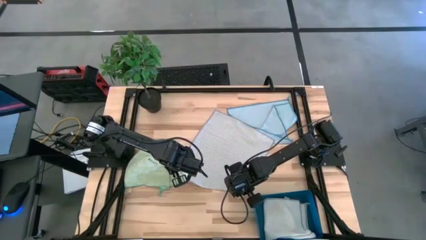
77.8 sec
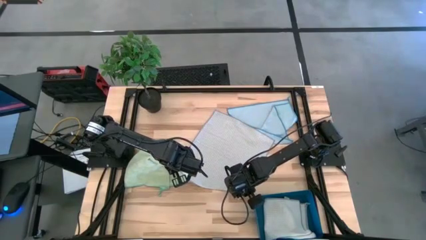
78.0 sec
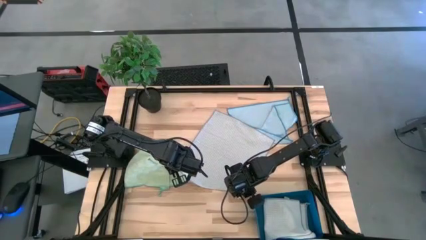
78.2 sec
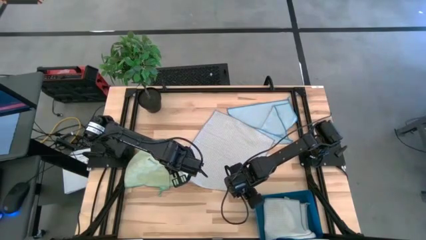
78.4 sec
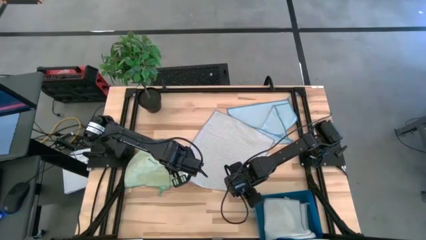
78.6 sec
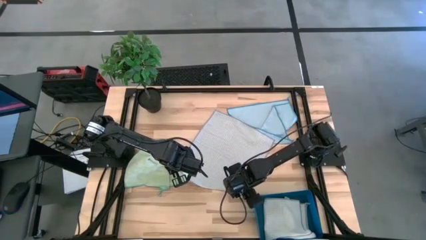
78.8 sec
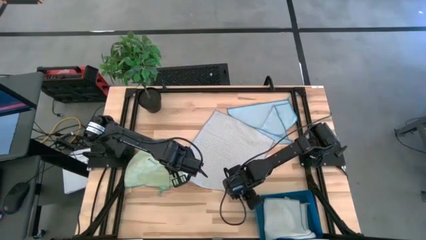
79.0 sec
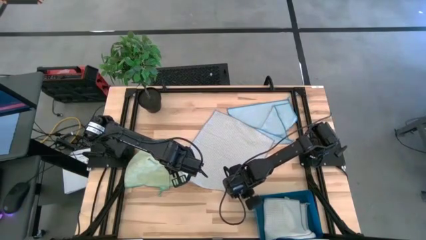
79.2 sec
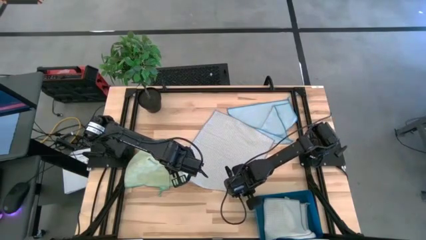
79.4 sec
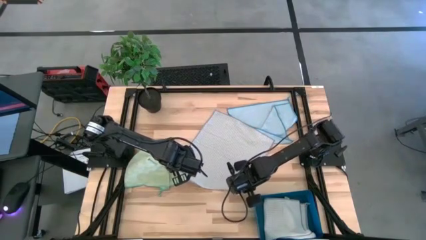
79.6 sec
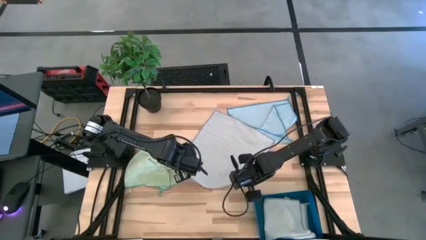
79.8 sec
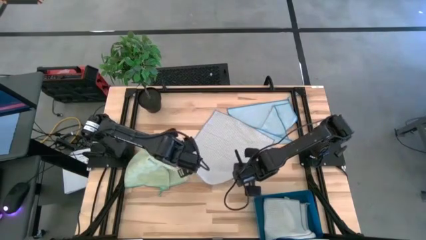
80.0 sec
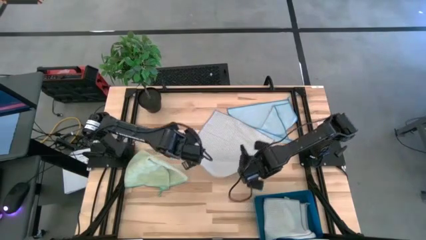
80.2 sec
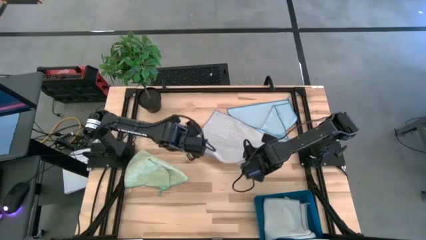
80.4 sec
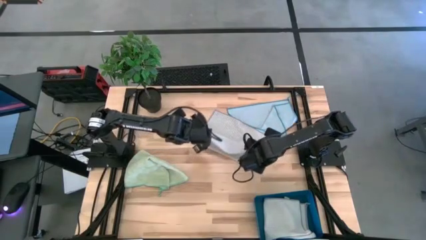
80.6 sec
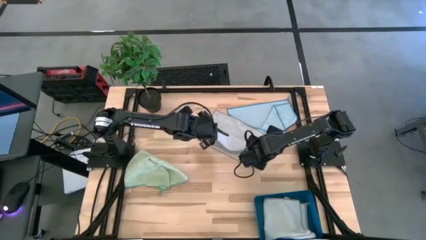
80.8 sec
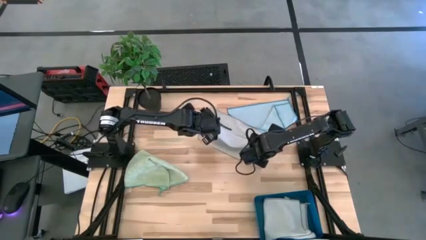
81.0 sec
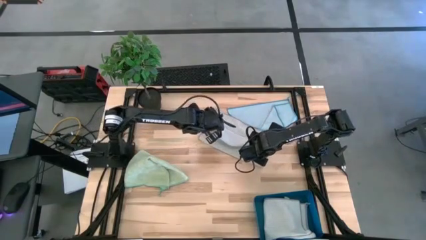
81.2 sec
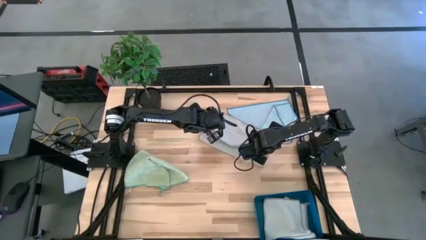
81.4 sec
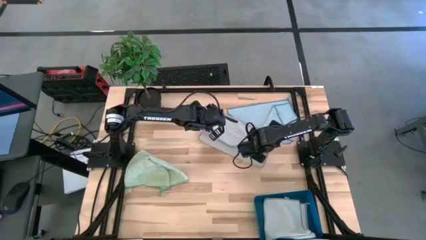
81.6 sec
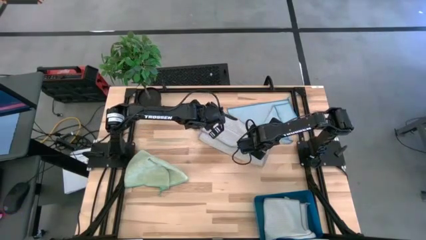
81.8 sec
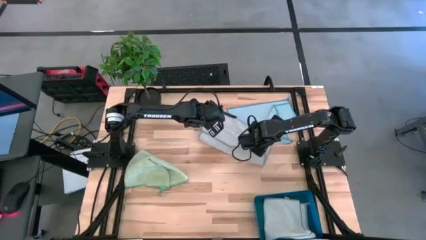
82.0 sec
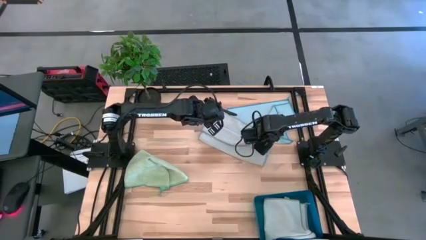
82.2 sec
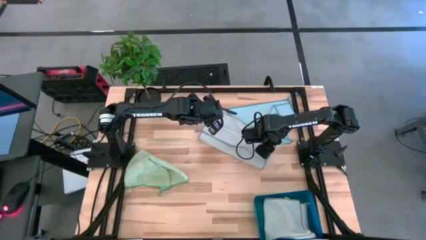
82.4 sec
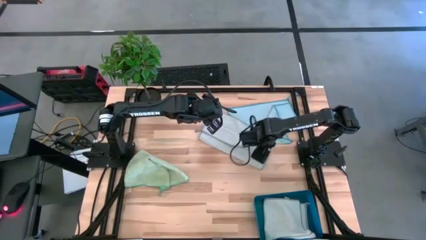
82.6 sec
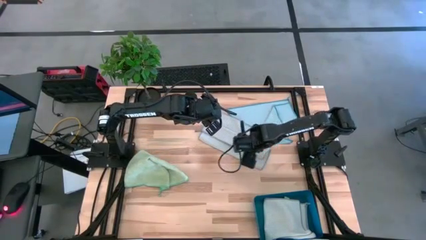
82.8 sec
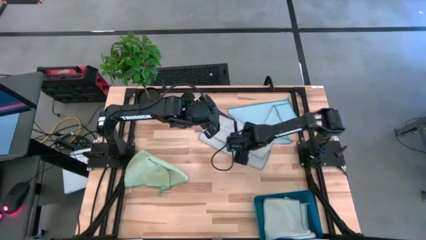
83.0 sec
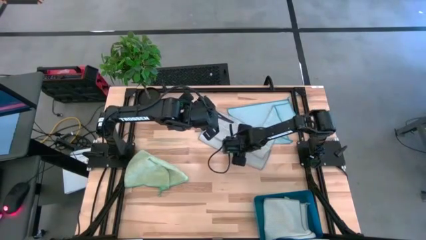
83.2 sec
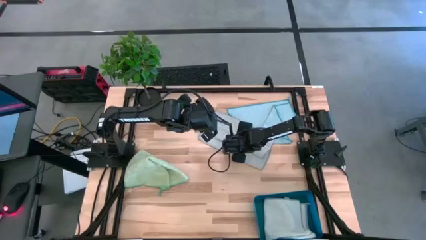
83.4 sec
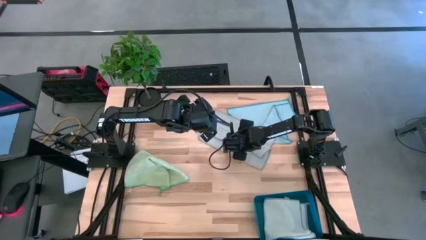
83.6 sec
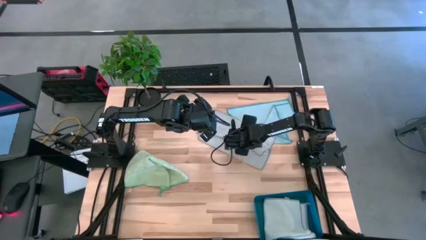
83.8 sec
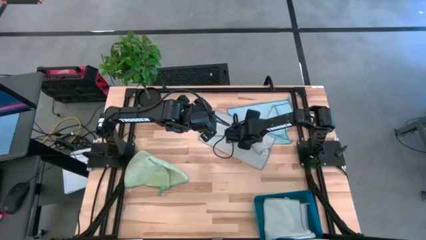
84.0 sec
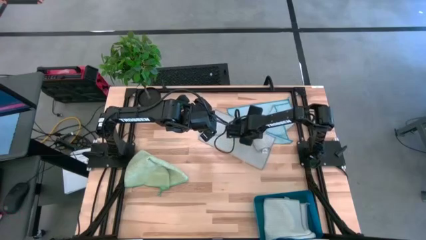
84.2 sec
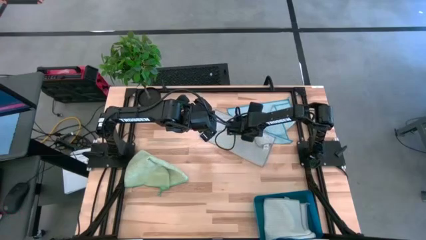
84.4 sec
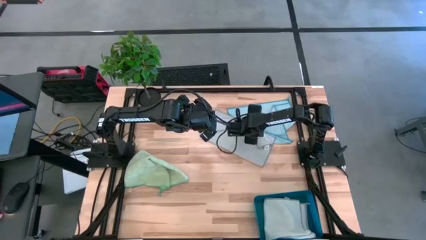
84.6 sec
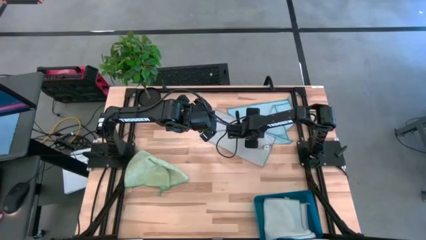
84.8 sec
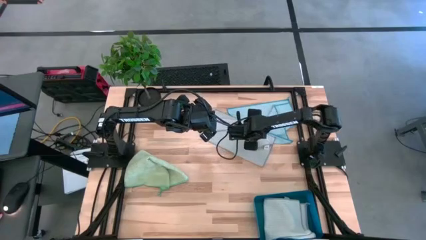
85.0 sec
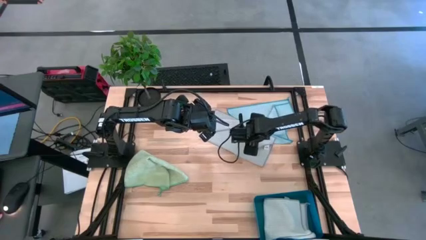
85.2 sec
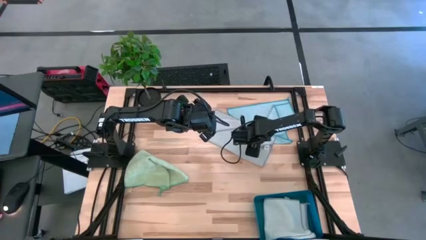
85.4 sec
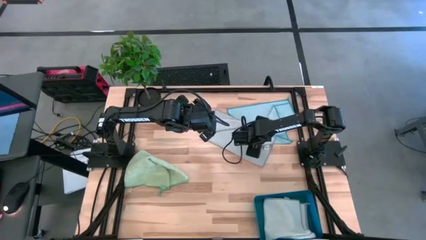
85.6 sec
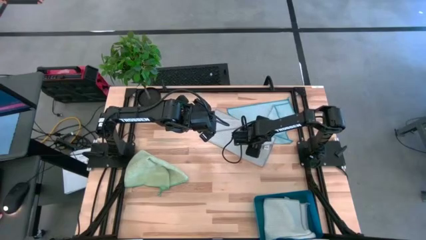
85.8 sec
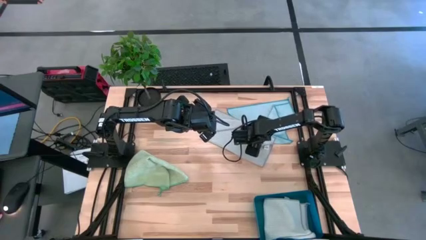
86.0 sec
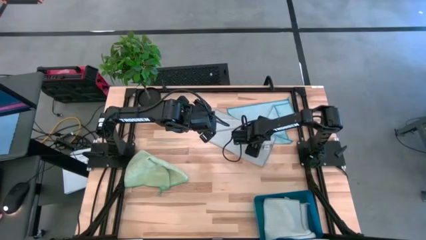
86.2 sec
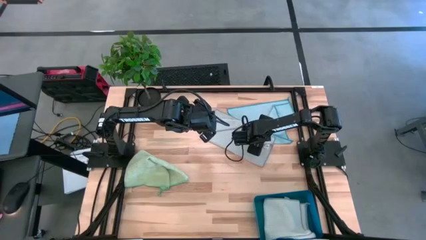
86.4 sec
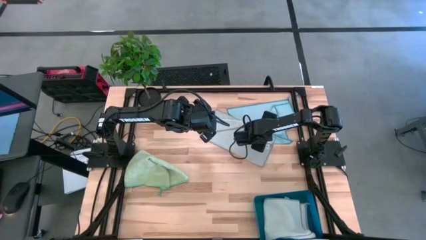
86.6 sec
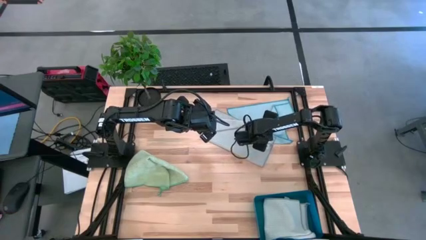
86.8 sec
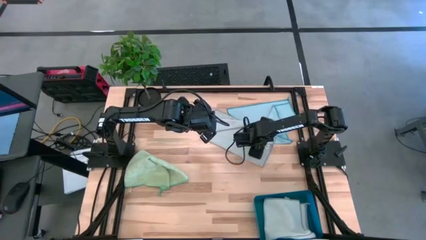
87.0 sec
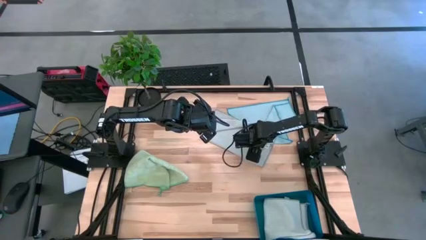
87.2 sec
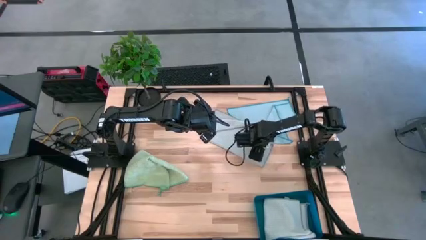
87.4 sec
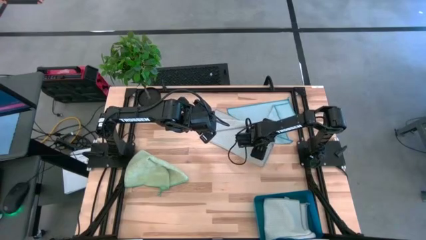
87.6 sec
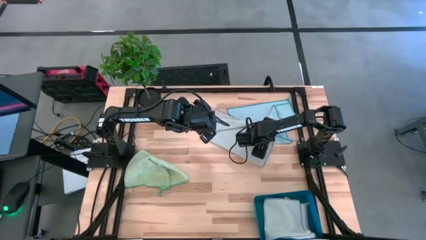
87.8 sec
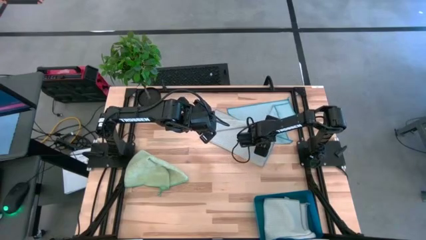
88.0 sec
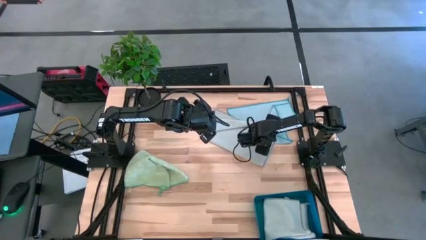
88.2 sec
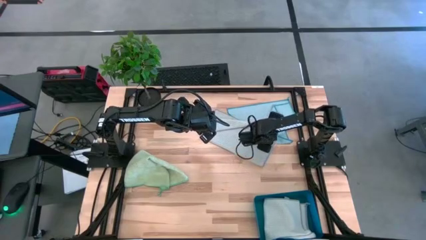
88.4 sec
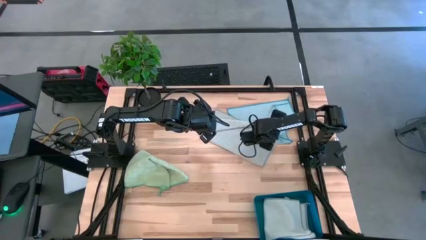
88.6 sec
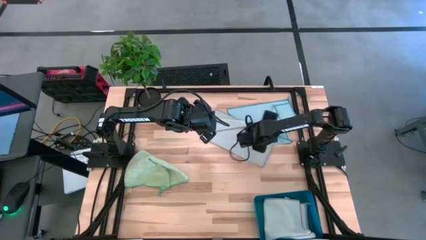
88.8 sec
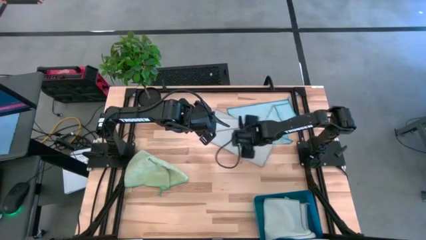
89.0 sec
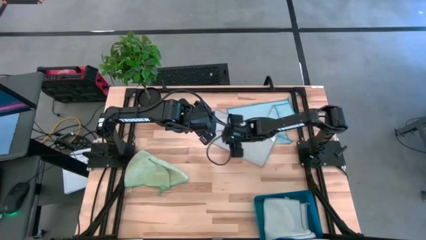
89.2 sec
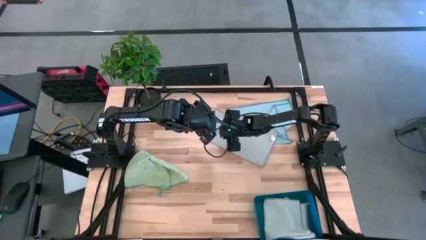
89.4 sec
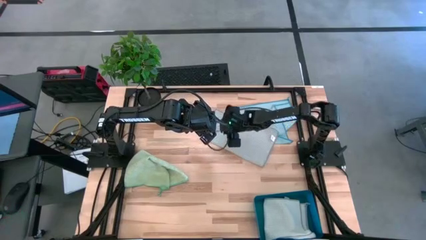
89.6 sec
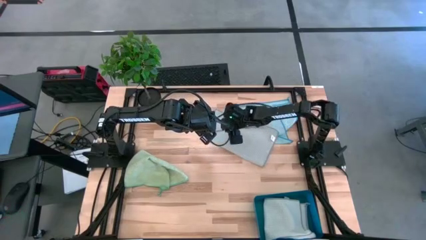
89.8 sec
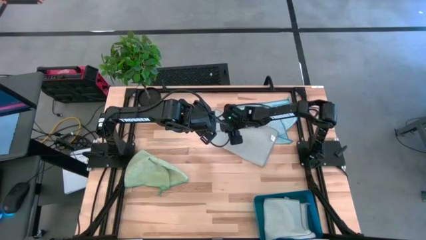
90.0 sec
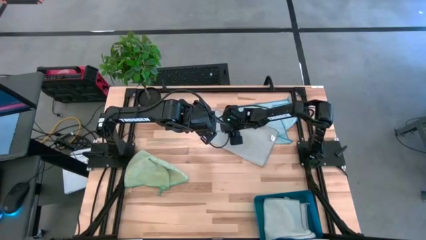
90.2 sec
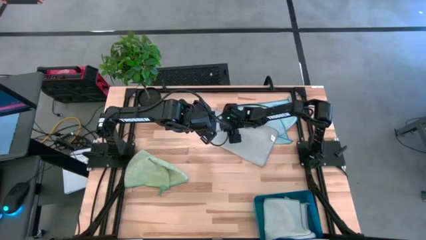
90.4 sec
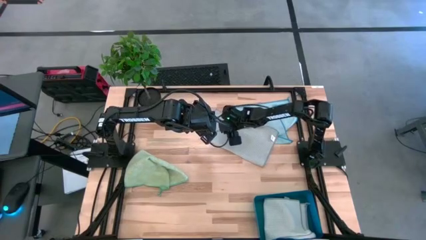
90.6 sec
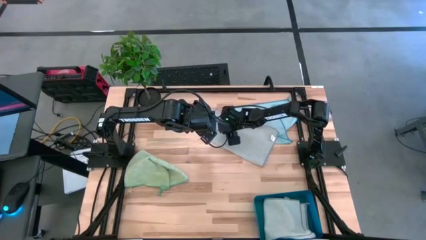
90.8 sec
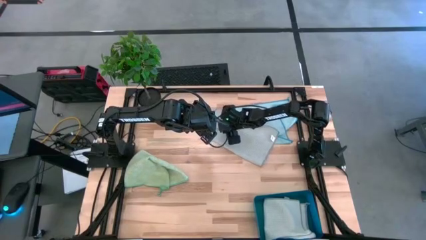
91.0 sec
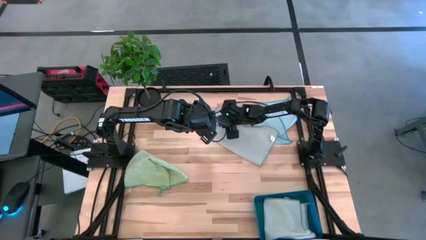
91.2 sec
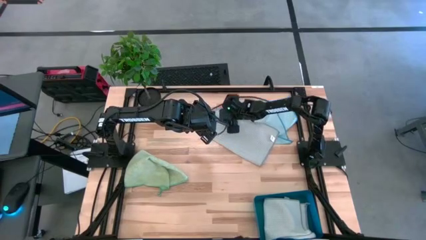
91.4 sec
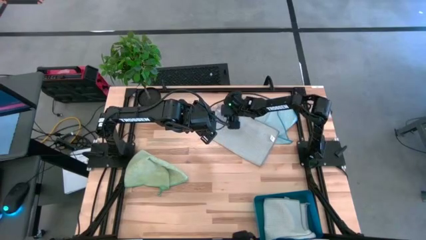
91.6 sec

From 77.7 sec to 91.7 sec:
Task: Fold microfiber towels
Fold the gray microfiber cloth

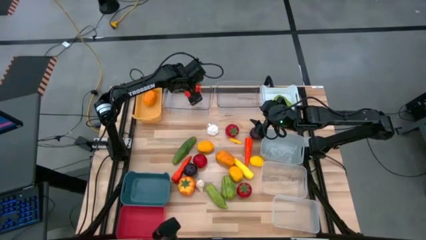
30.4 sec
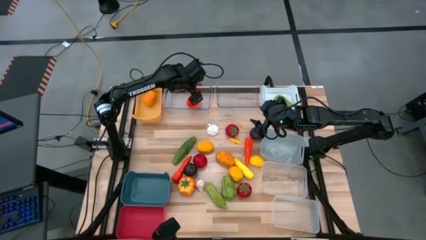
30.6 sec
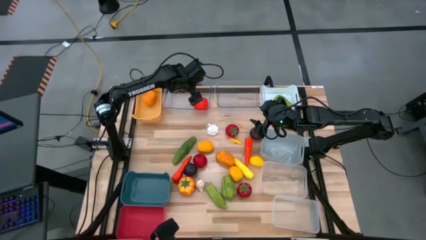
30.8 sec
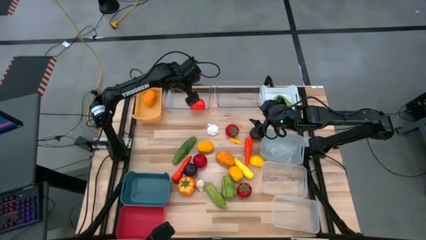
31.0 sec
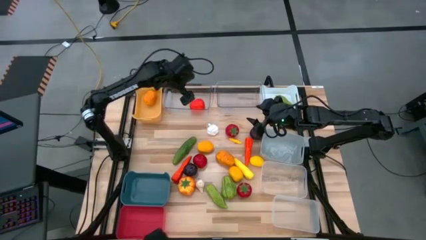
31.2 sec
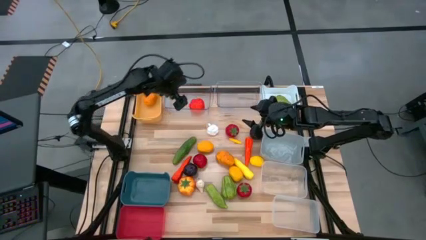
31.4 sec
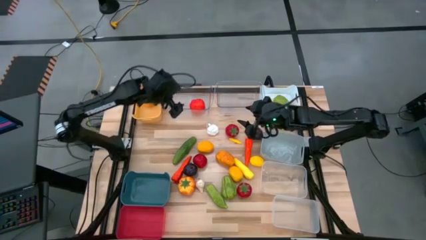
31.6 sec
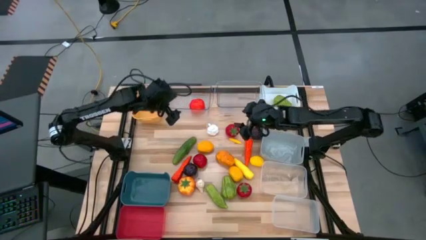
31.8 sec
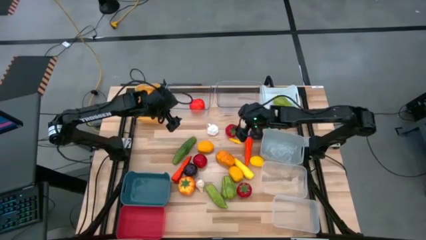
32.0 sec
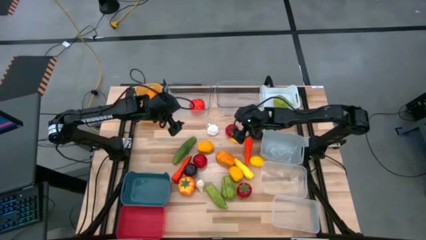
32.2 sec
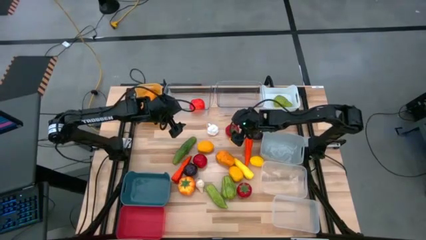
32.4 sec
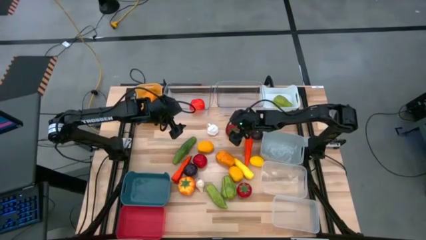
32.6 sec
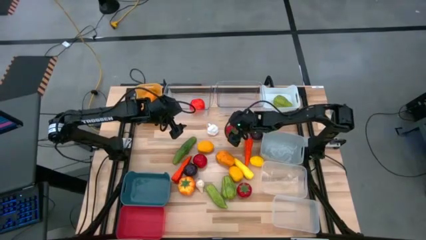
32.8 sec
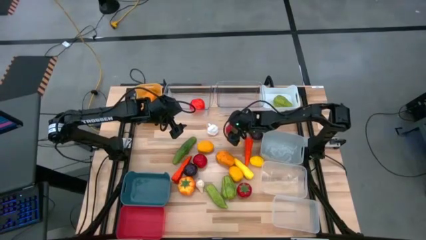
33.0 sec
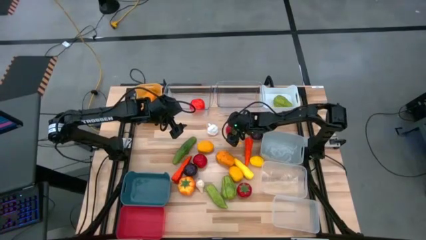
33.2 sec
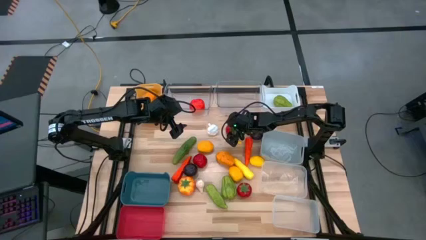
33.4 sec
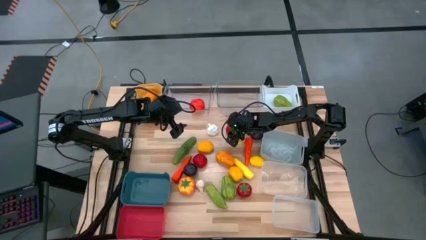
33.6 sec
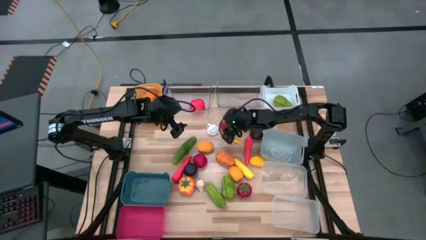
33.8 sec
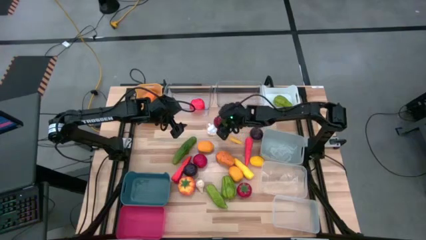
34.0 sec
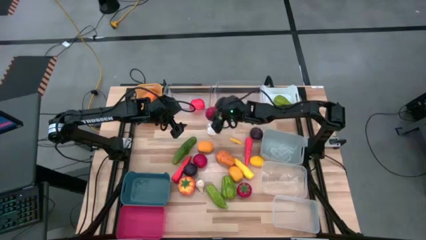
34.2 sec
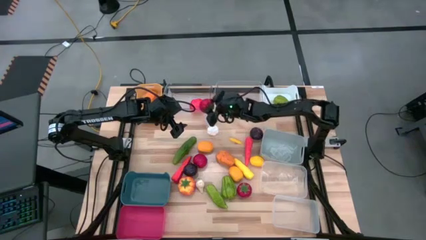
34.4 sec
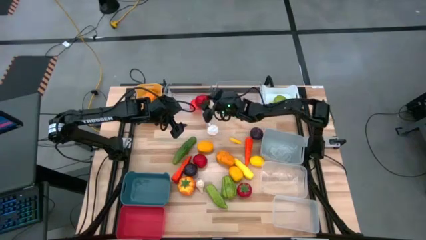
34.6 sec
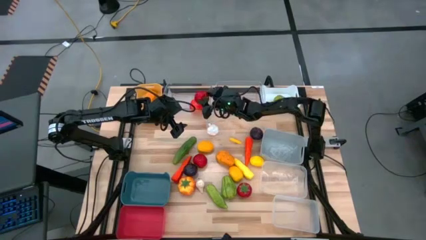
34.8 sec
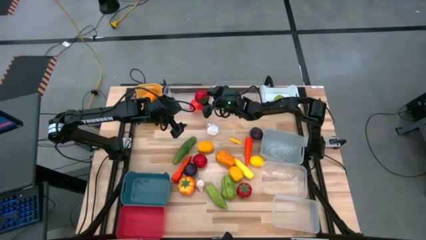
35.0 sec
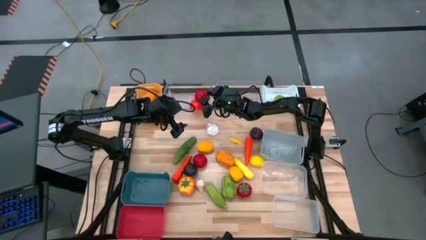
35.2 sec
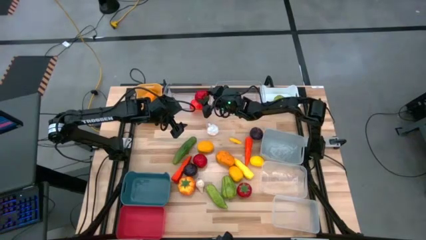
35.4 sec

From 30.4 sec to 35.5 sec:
Task: Sort produce into baskets
Put the red tomato into the left transparent bin
